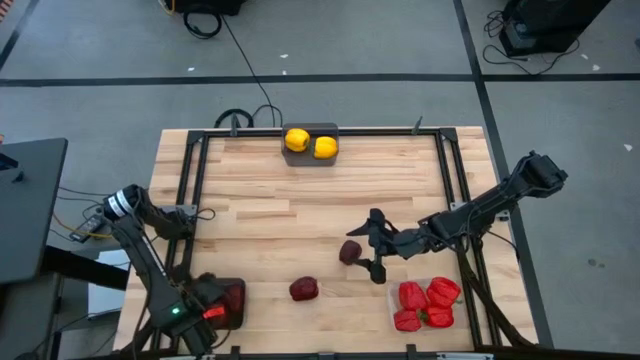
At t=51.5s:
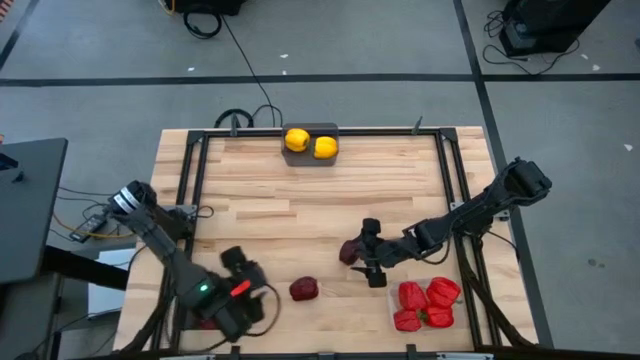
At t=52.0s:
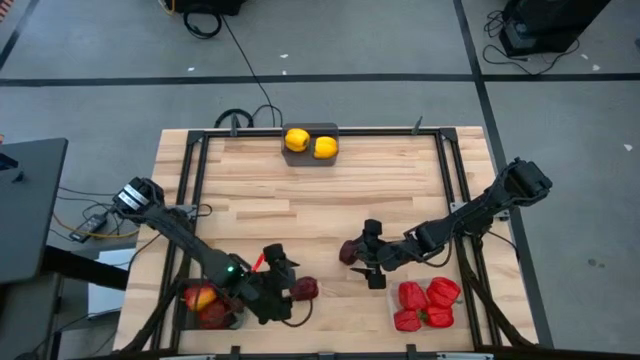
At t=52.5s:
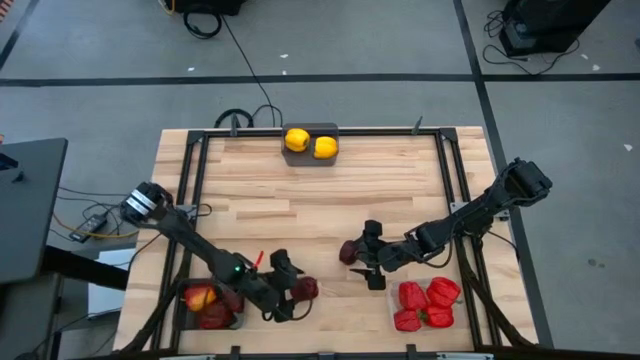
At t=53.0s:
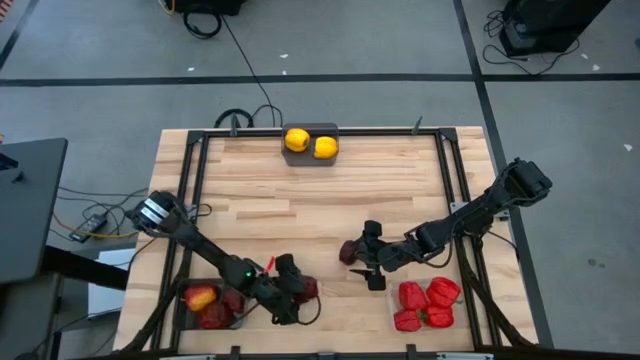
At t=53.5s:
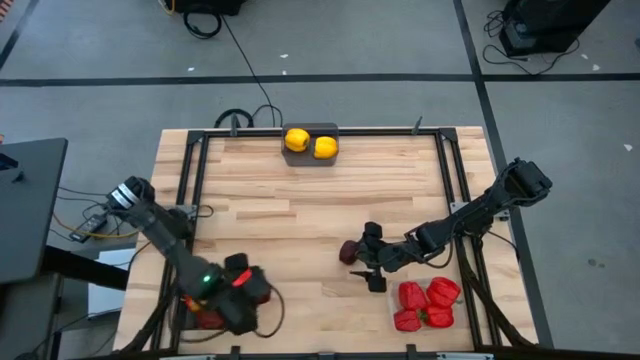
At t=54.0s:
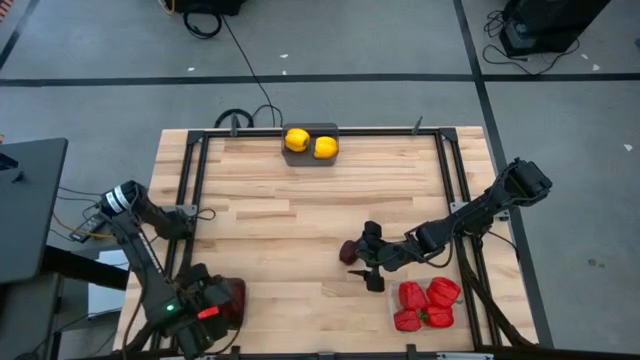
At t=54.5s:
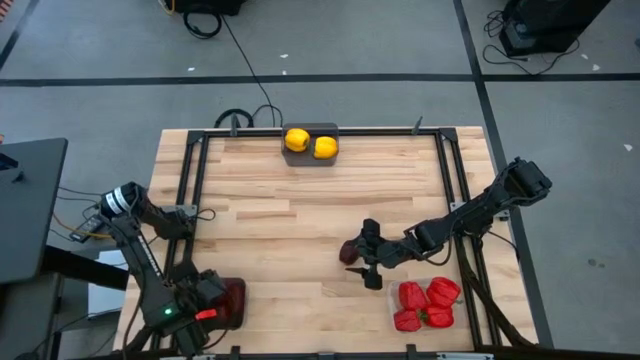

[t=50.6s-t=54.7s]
Task: Sort produce into baskets
Put the red apple into the bottom black bin

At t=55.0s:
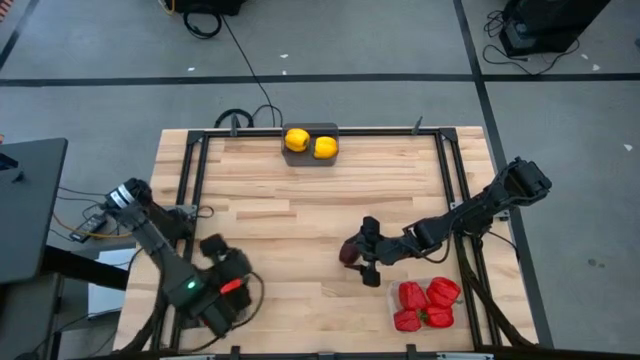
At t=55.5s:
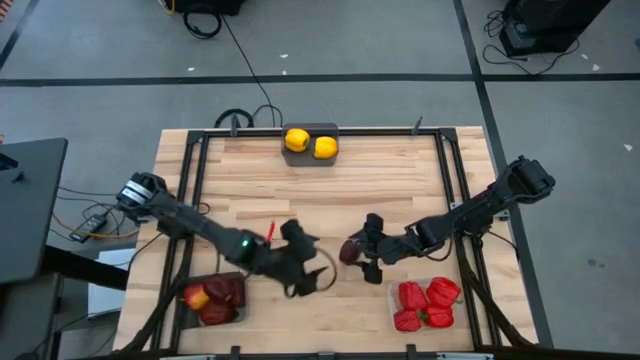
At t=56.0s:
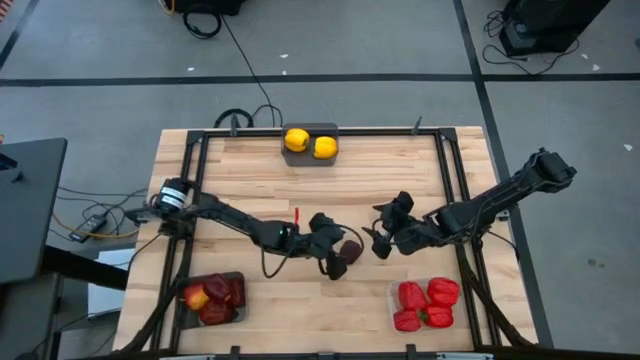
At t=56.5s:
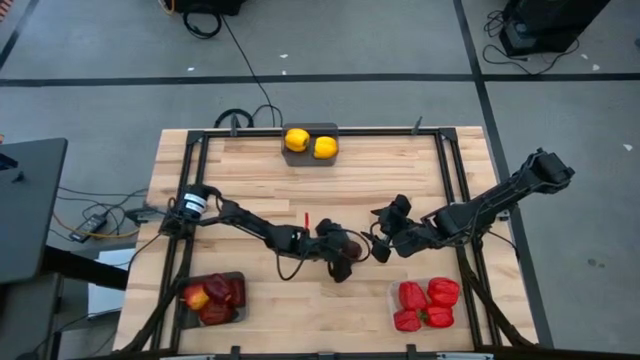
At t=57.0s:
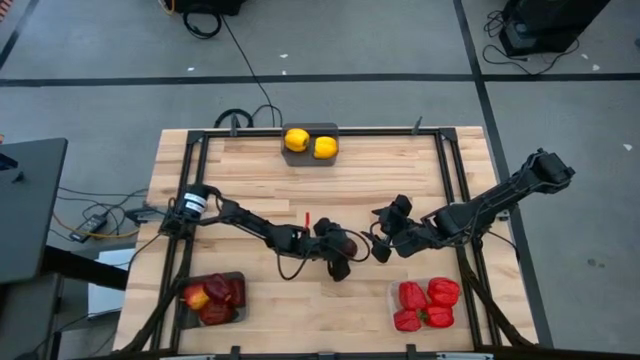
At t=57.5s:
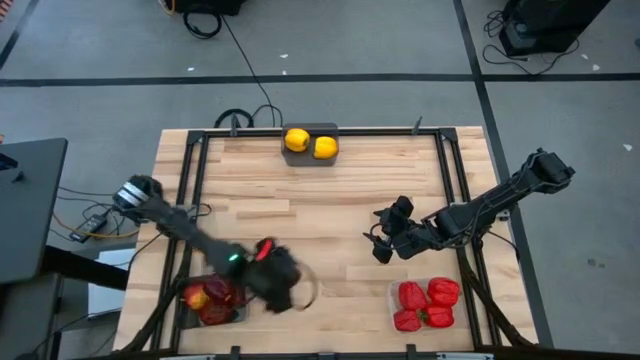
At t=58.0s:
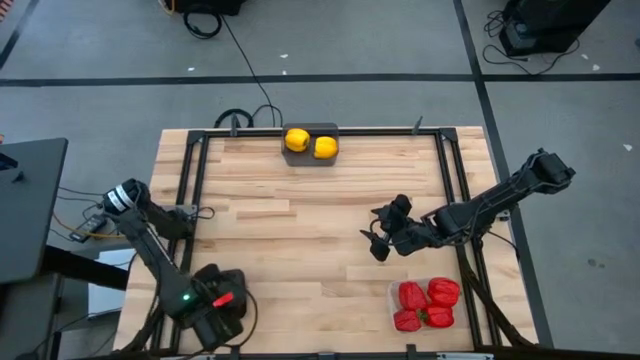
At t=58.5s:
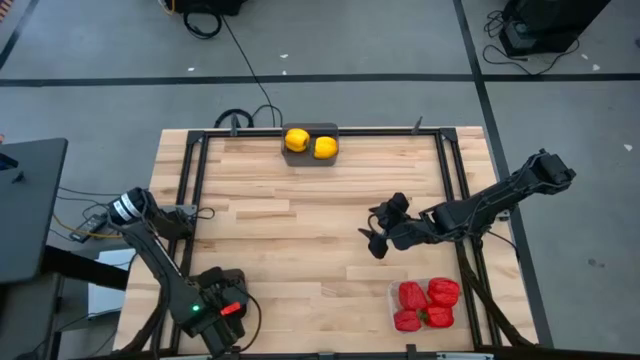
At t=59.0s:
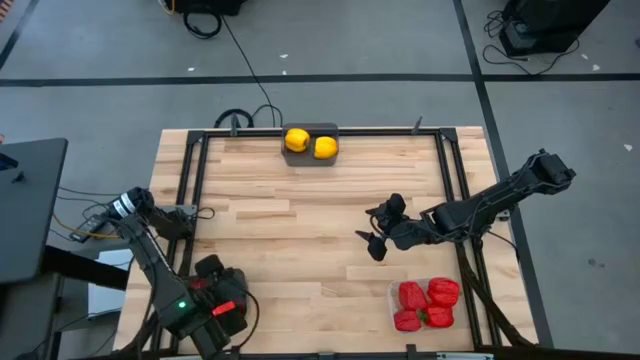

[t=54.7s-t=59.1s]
Put the red apple into the bottom black bin

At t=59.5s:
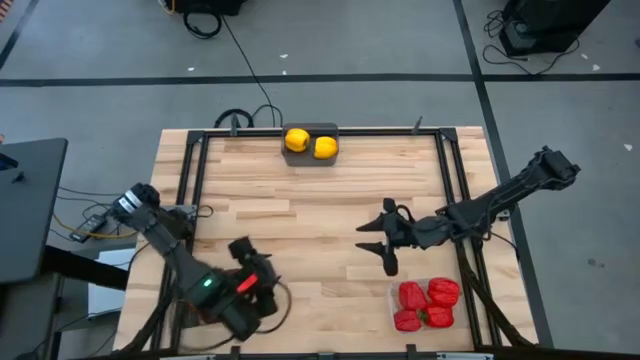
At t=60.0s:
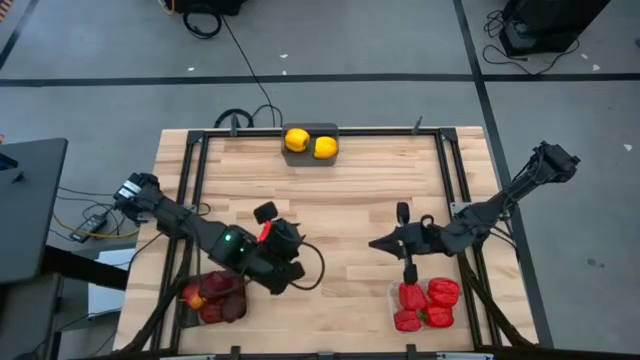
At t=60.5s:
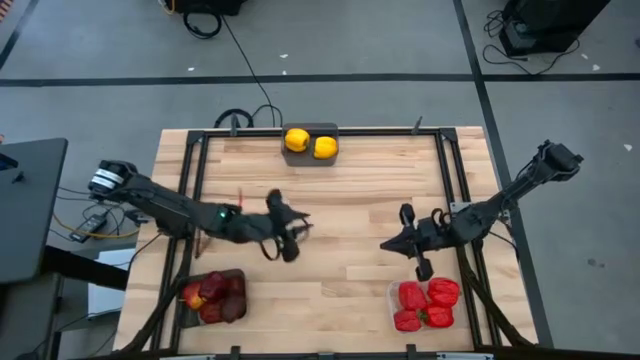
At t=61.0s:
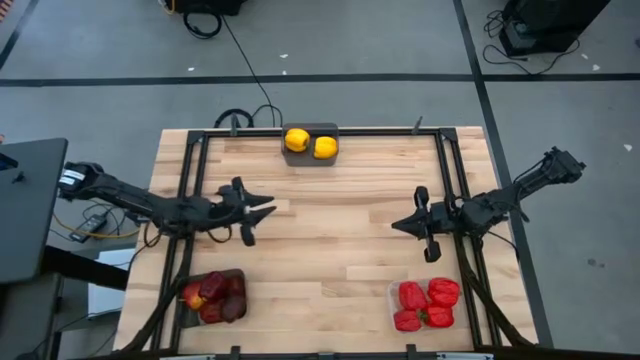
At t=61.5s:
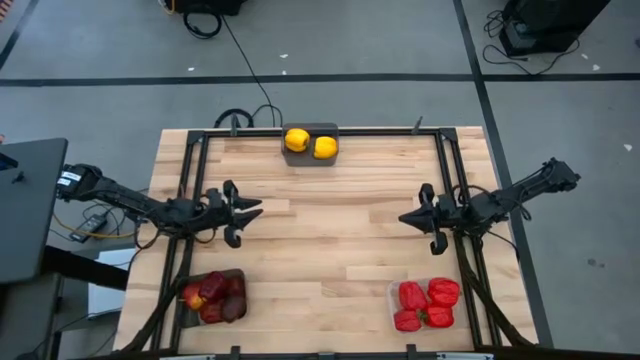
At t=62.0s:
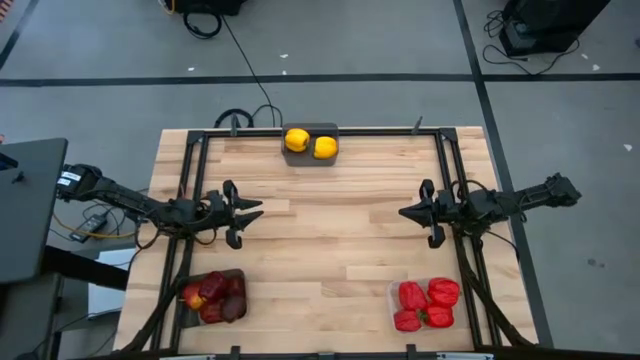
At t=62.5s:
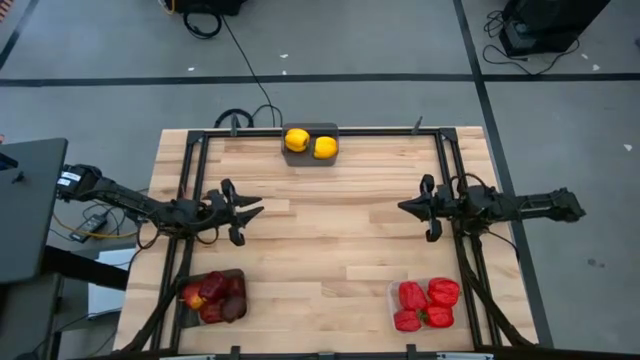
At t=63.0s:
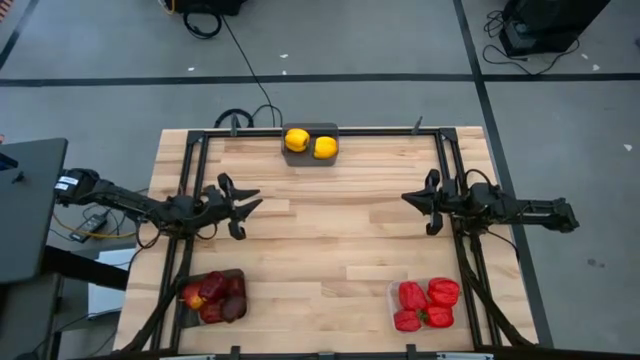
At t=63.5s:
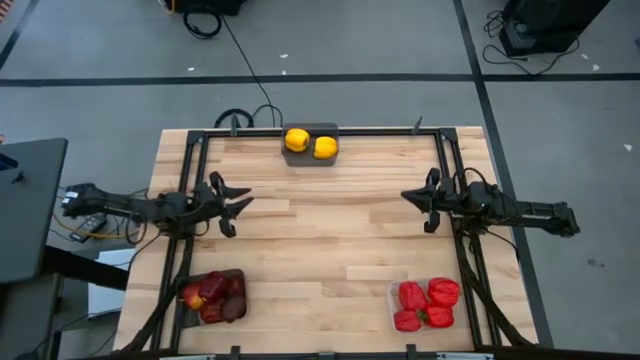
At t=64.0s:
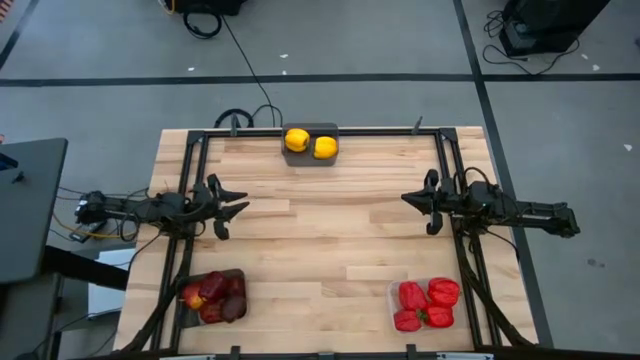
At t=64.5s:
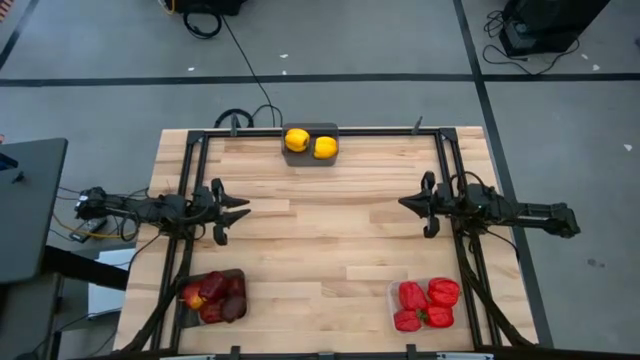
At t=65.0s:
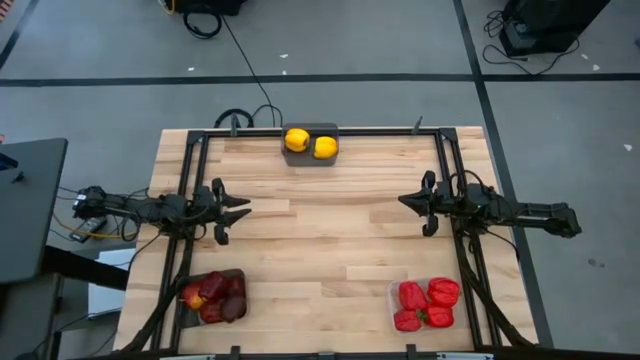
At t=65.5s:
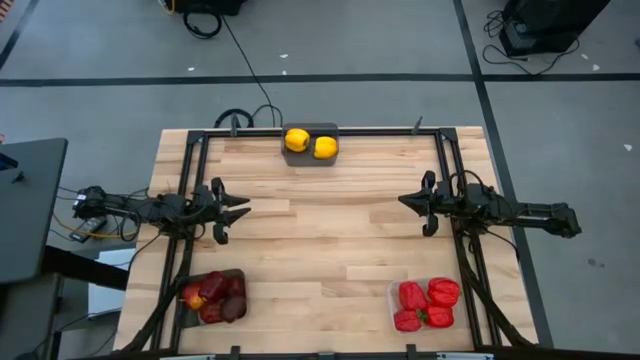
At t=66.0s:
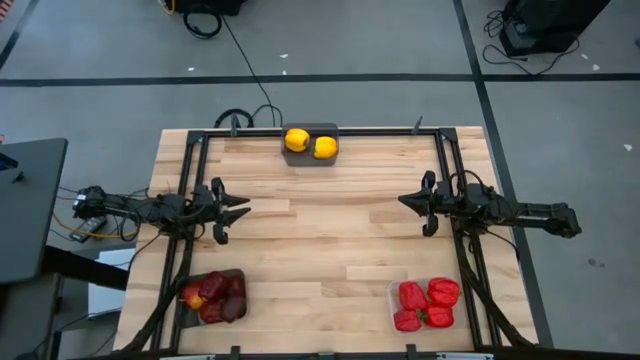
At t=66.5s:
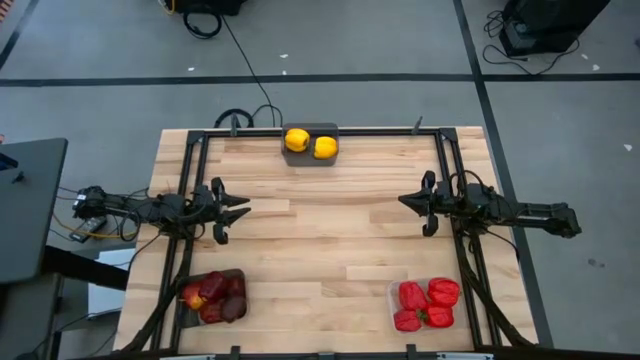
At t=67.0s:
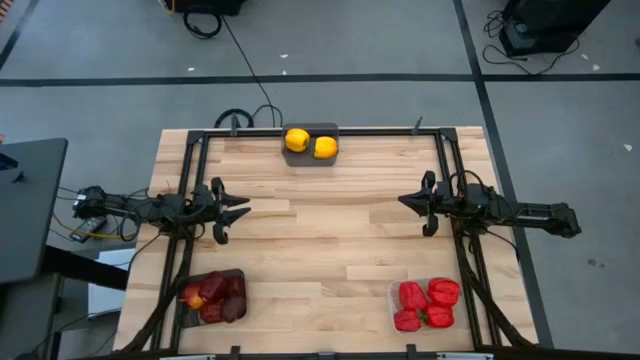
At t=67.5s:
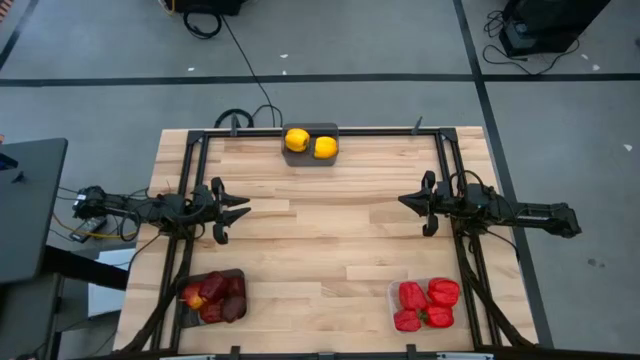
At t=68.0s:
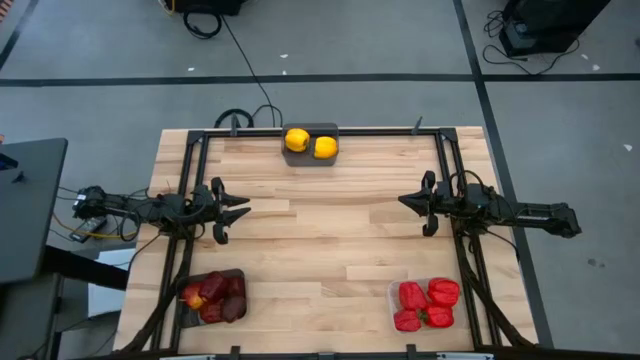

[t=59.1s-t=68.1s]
Return to Home Position

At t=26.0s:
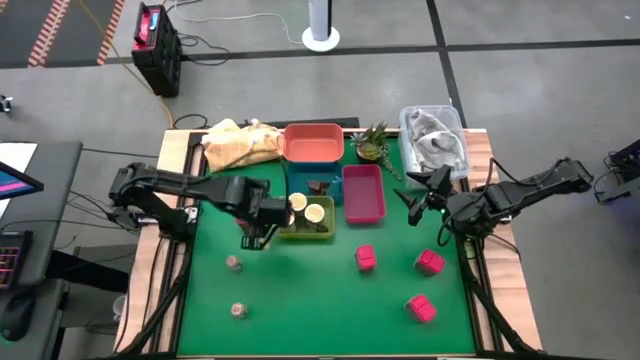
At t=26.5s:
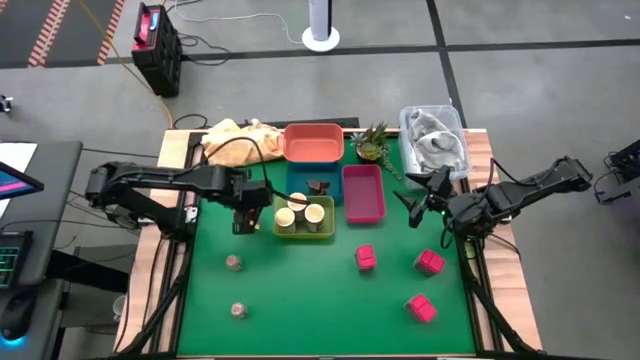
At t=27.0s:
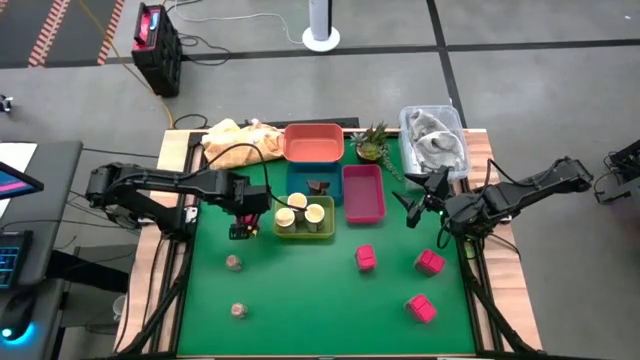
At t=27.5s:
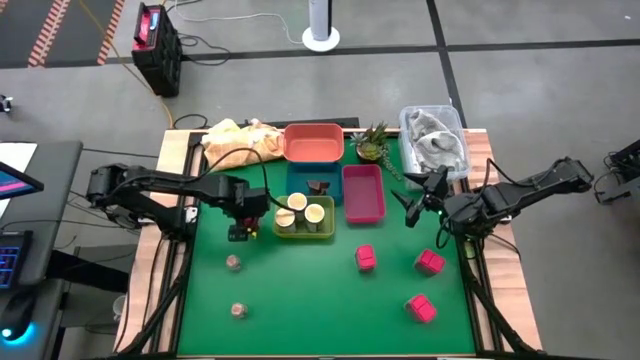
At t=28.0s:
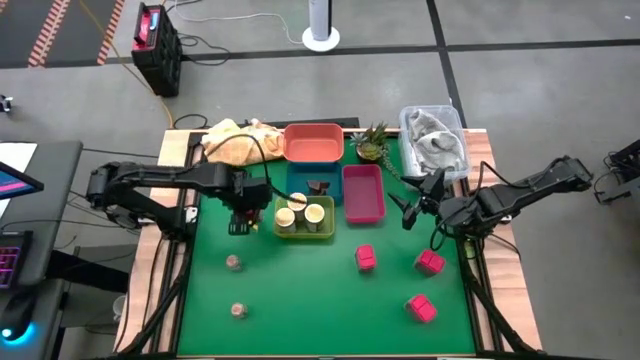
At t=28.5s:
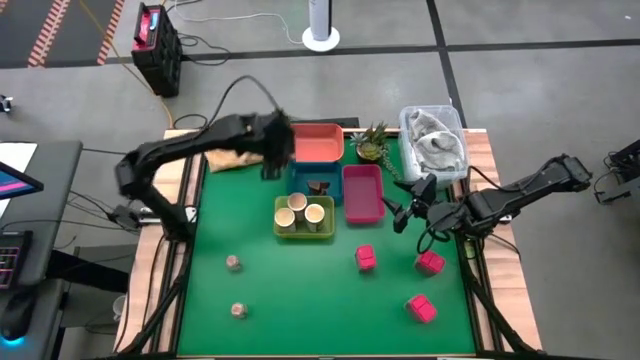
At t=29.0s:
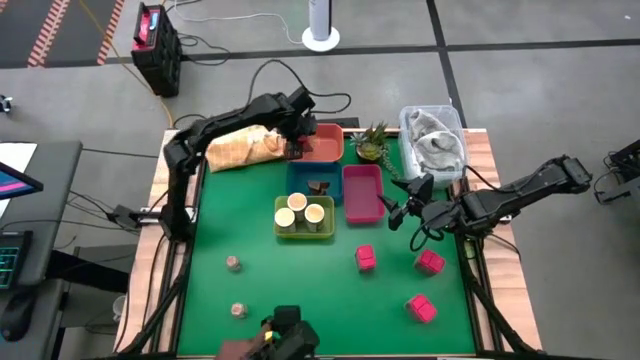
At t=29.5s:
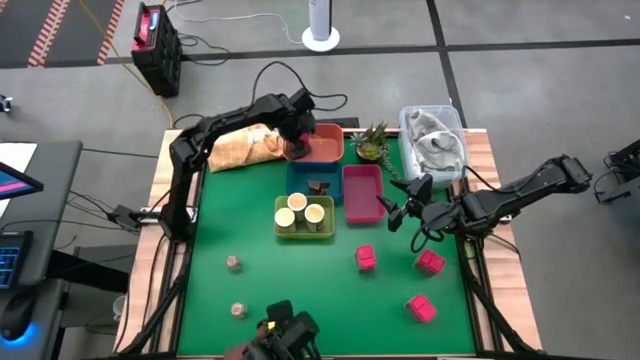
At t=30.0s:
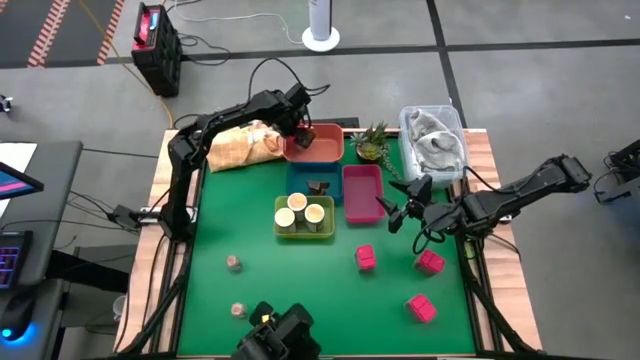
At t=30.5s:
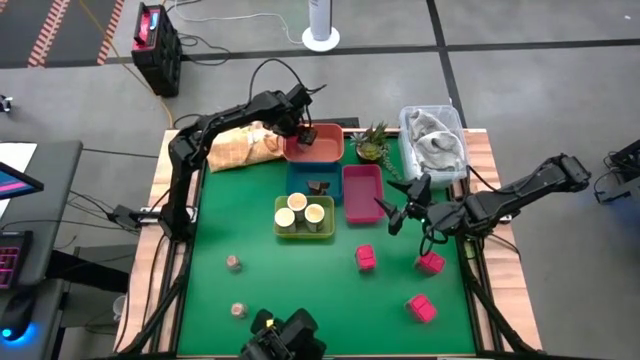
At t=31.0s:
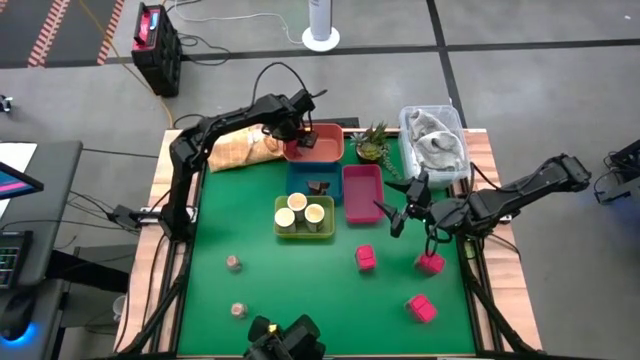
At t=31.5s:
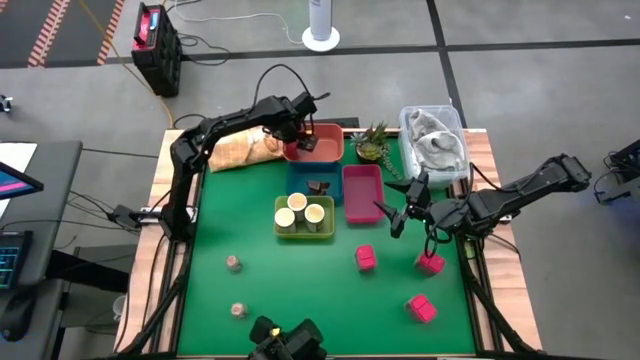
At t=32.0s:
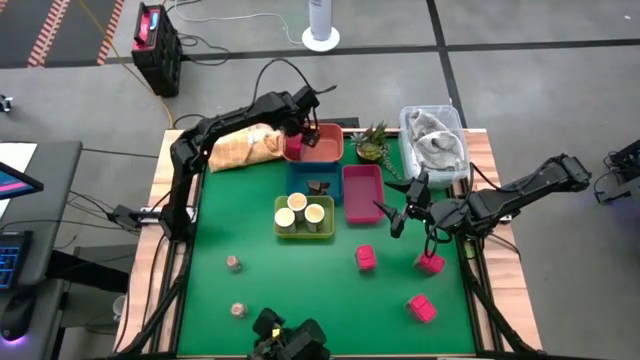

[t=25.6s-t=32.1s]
Task: Sort spices by type
Put the left red seasoning can into the orange bin
